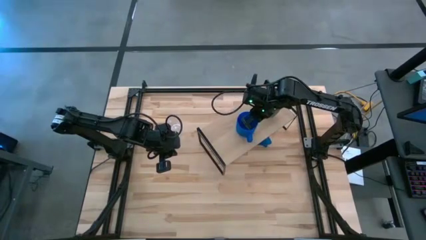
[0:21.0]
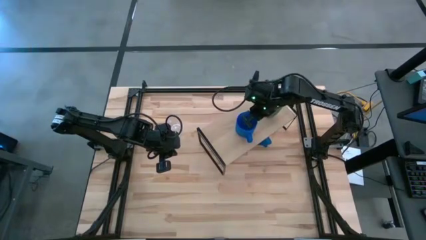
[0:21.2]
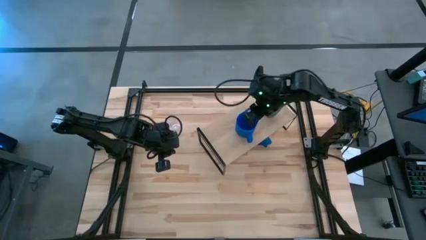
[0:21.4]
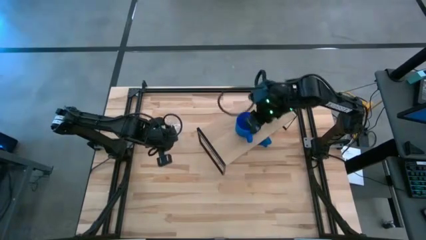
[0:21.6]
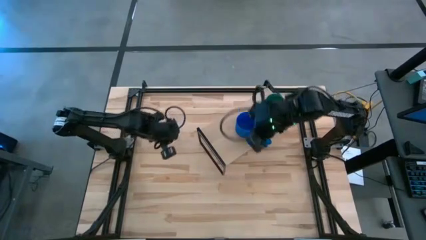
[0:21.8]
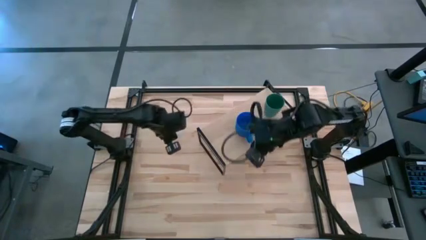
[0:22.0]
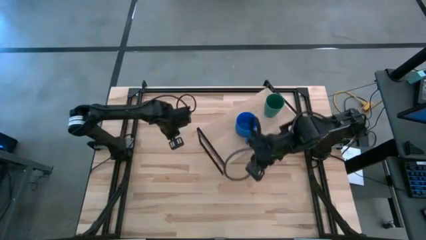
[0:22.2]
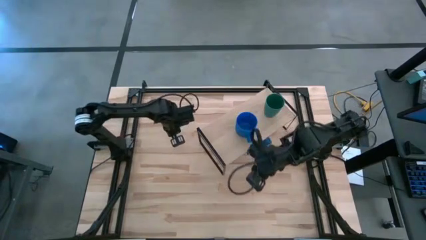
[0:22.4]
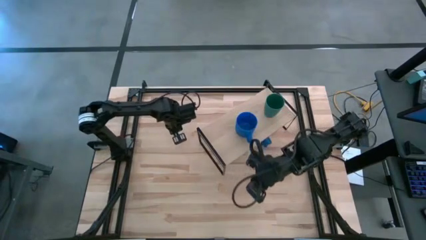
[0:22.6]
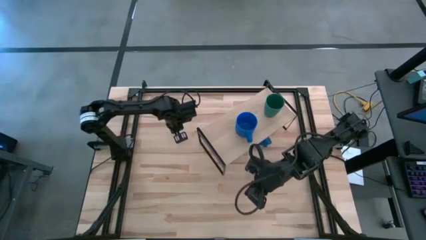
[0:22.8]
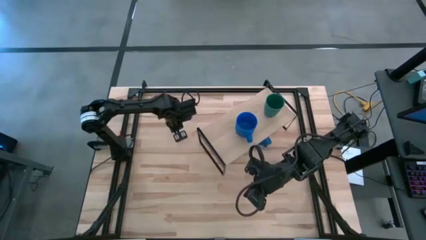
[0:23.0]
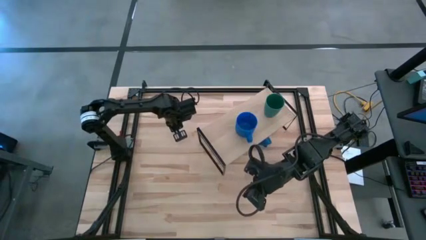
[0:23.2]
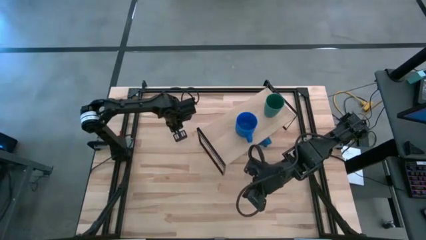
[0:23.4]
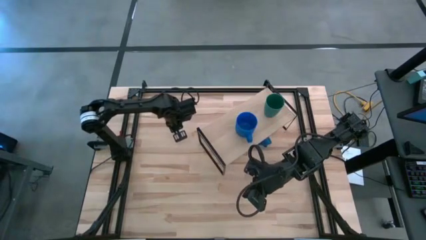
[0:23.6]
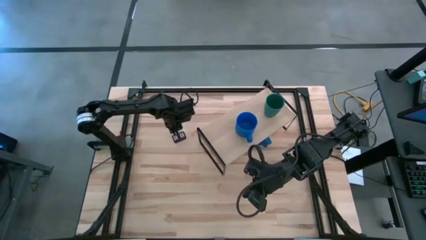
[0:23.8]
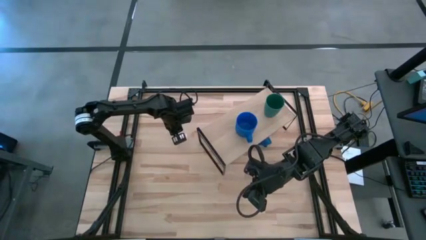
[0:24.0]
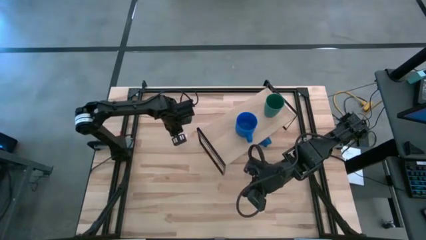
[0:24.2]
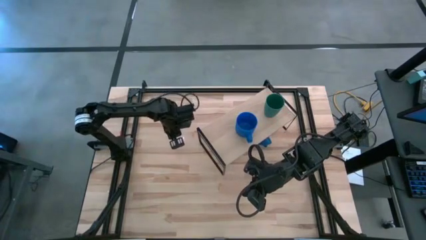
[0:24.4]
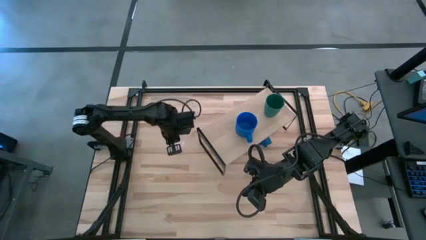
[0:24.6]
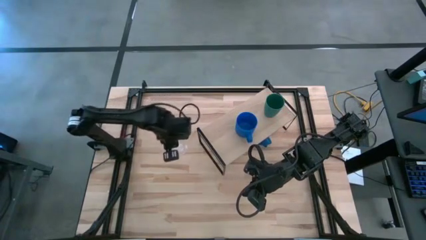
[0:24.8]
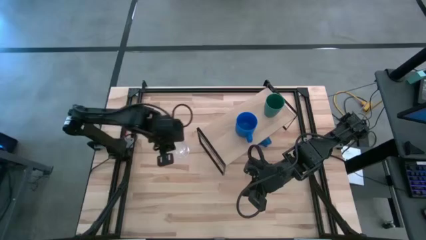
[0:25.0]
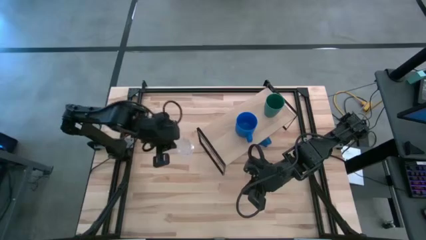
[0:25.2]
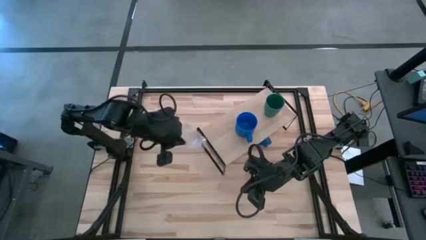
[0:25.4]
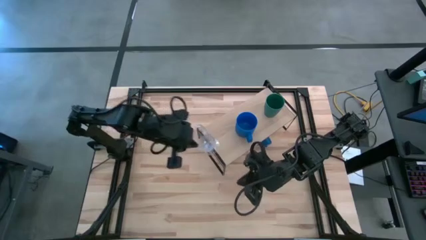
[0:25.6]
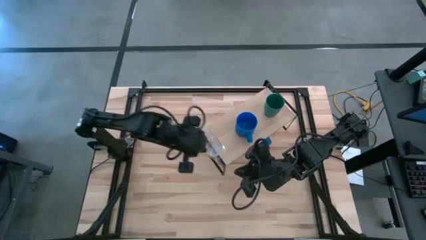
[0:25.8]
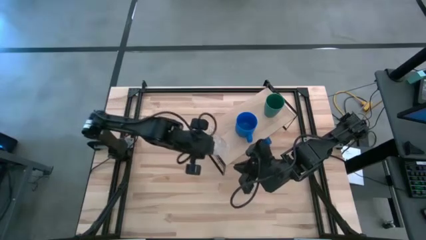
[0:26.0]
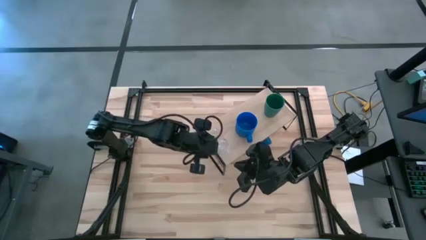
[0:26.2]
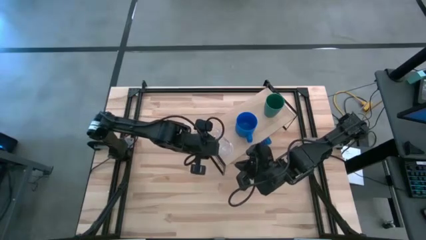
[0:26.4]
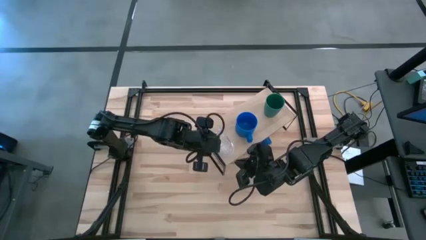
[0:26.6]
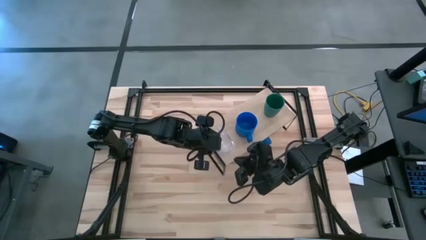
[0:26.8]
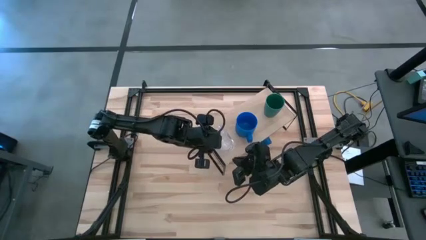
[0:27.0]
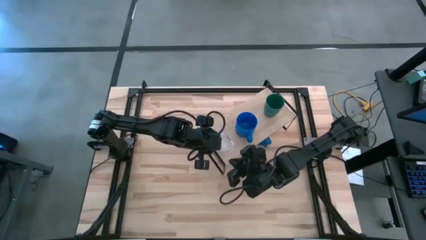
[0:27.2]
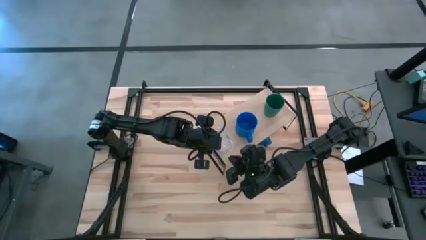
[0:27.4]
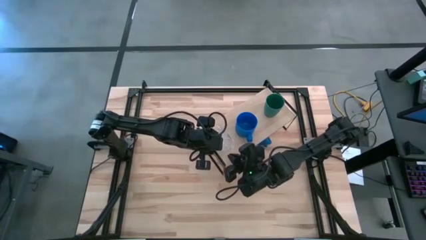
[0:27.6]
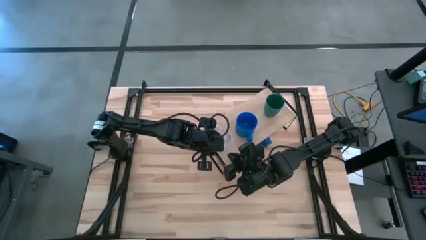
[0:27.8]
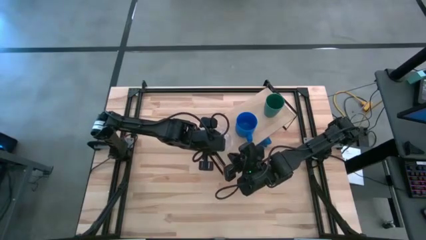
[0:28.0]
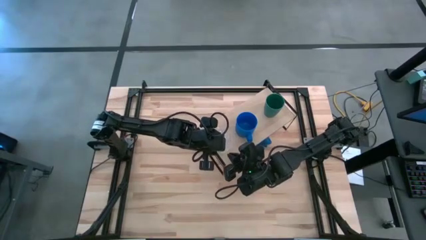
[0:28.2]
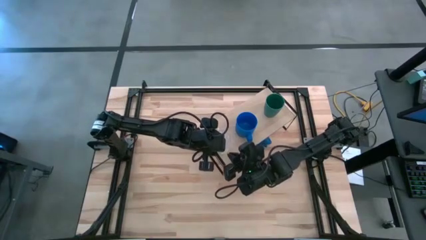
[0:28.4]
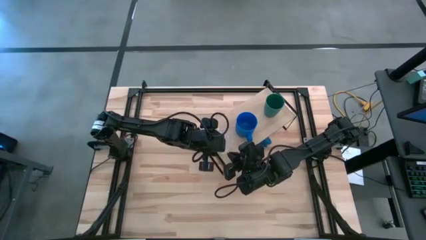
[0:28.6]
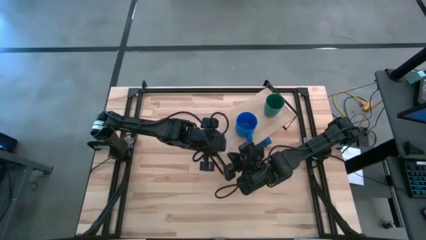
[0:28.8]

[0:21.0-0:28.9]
Task: Stack small to large cups/mugs on shelf
Put the transparent mug on the shelf

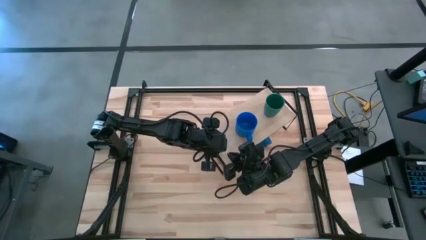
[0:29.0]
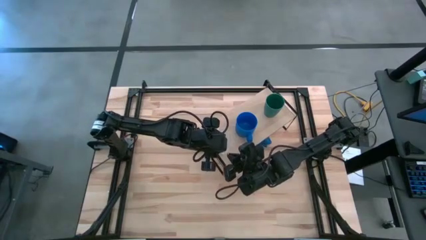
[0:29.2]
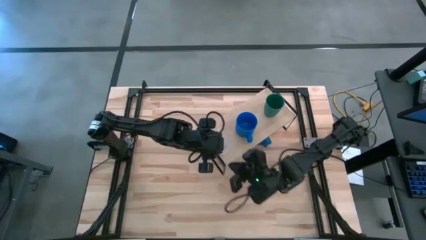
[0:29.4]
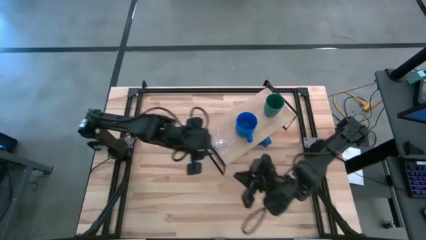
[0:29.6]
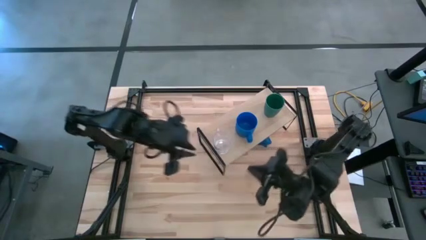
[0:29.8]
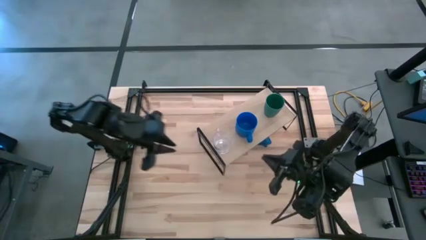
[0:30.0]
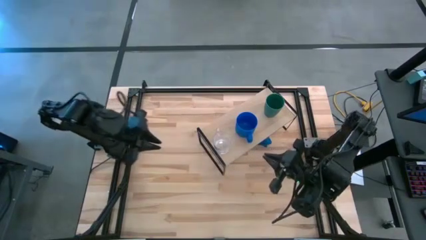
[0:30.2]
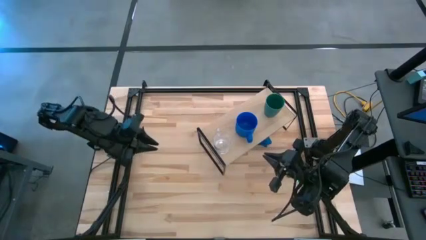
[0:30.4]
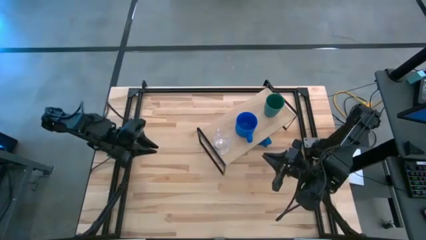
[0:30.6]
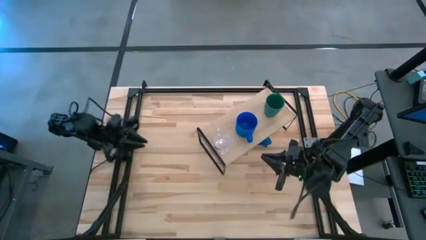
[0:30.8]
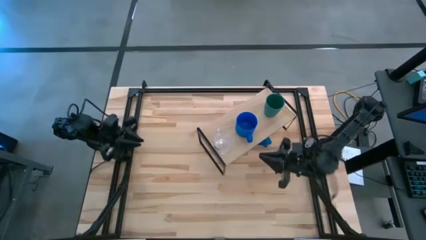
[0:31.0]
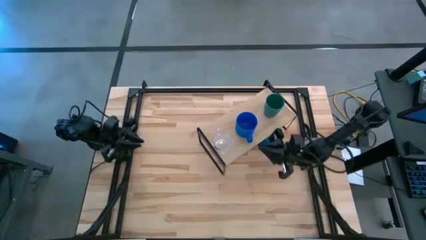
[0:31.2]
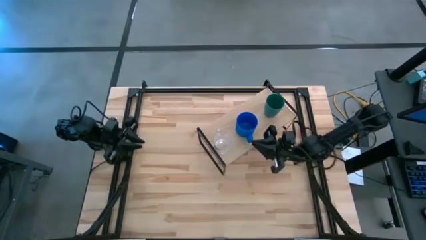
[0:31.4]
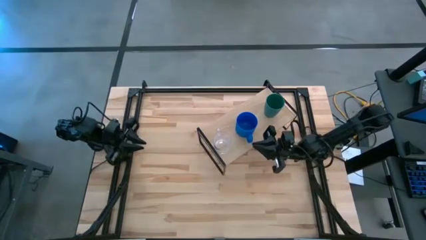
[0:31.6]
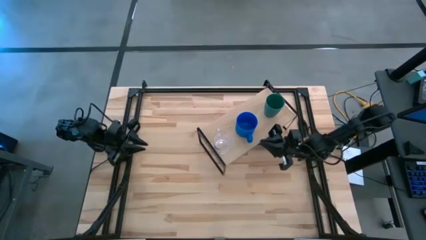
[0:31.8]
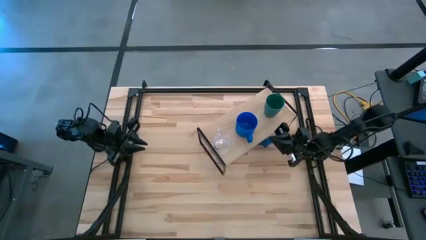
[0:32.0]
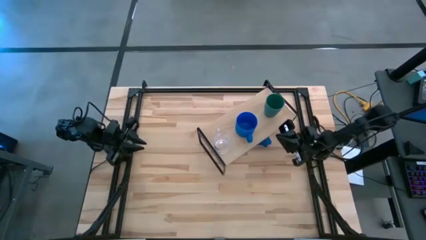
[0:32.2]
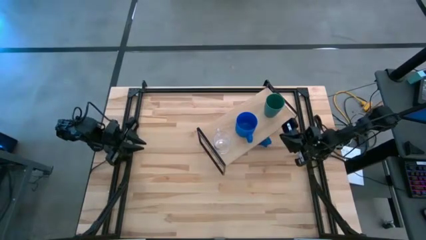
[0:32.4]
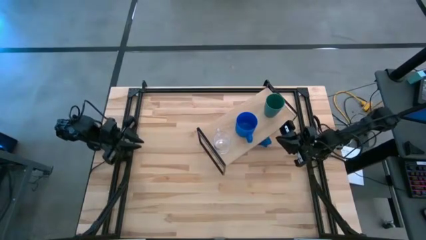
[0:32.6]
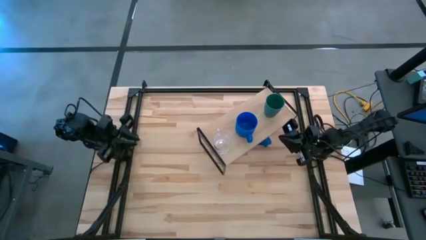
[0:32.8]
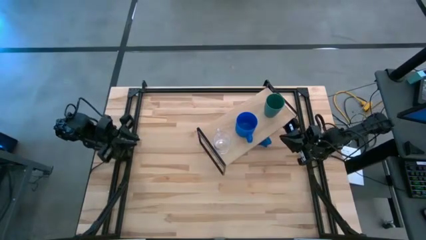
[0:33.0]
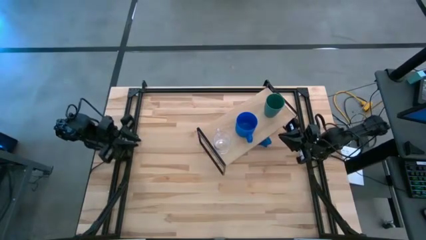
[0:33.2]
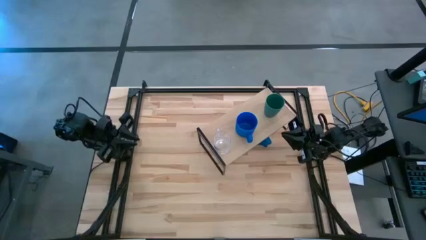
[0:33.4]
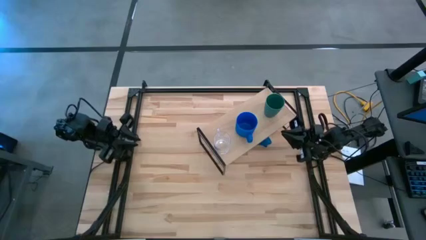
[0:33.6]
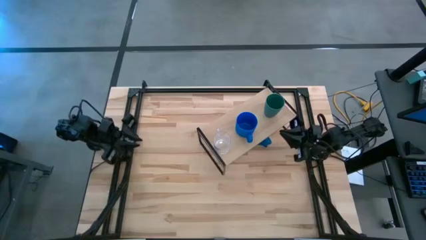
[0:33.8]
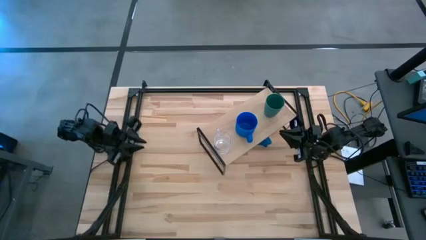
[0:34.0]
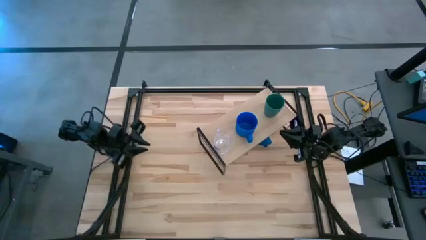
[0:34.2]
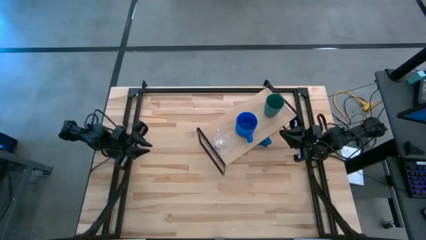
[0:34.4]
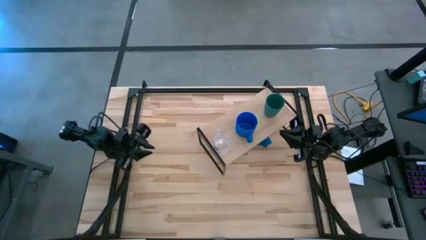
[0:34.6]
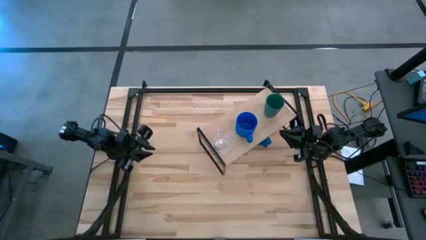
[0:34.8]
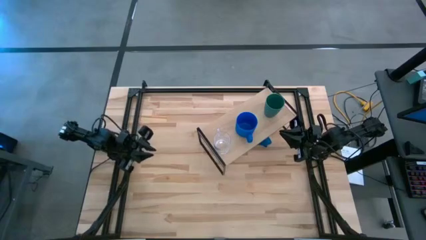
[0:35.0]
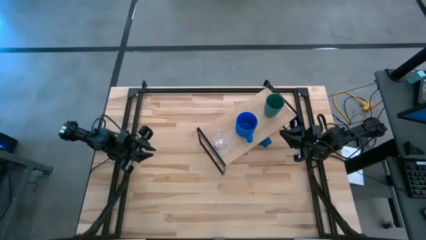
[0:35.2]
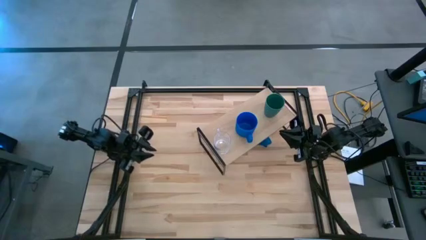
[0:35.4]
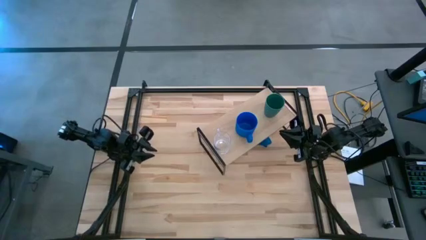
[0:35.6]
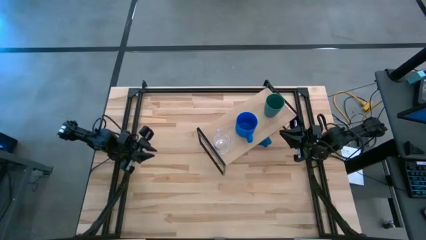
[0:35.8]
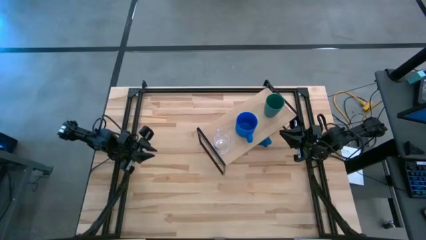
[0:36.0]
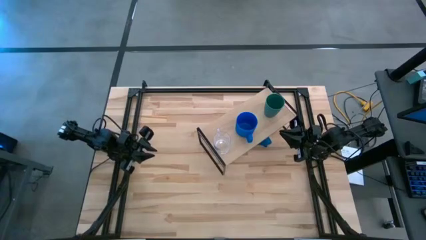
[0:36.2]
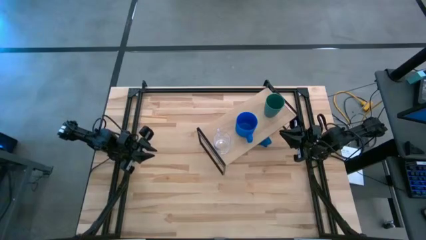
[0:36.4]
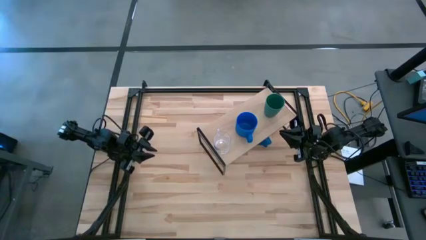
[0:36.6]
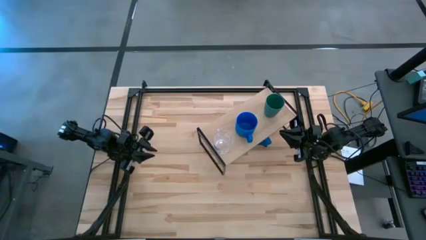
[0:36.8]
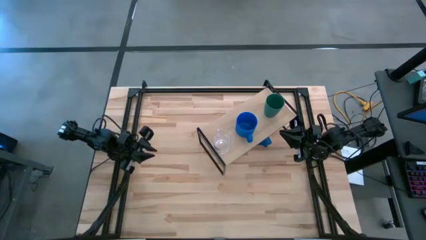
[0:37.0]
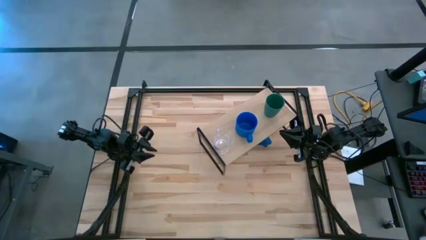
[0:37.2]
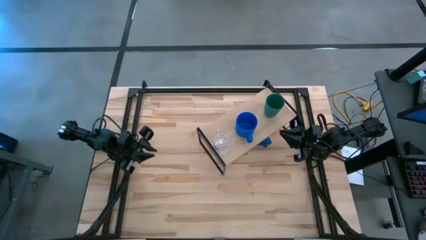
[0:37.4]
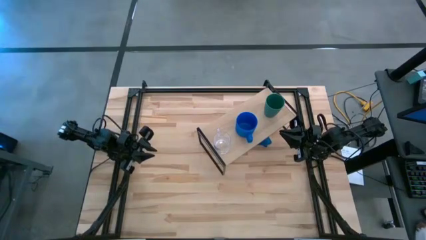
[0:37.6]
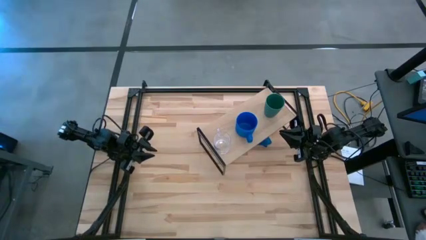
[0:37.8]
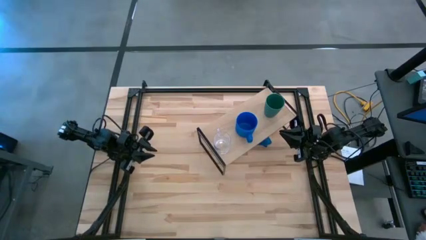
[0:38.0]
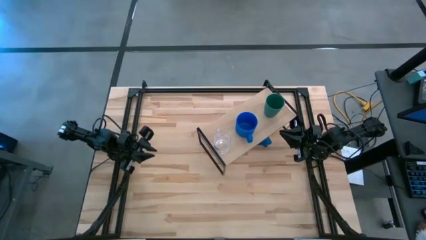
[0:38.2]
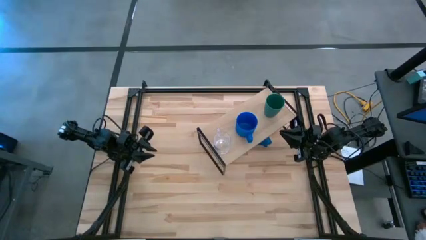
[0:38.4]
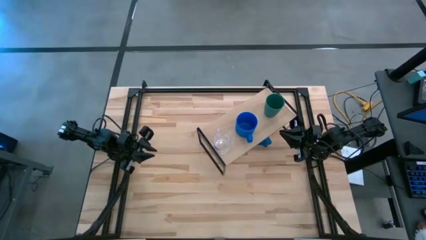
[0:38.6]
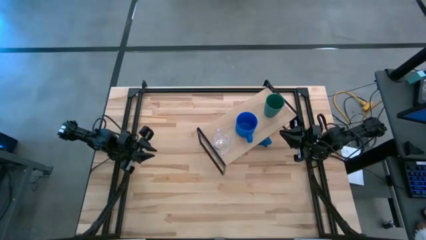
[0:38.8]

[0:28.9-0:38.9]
Return to Home Position
